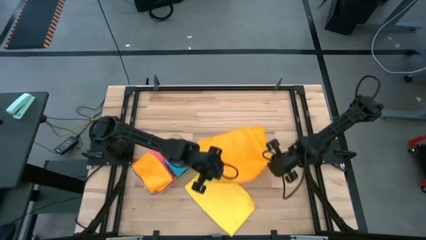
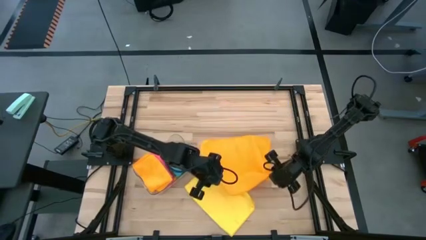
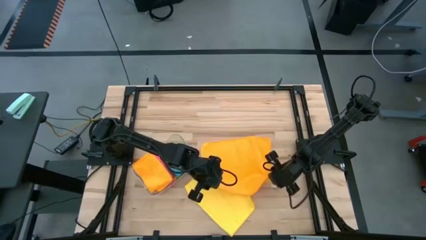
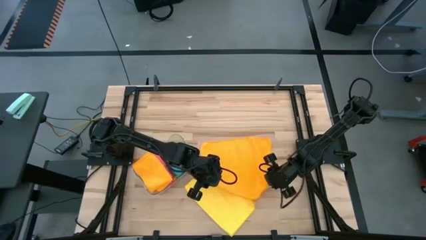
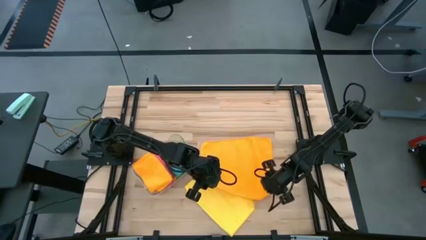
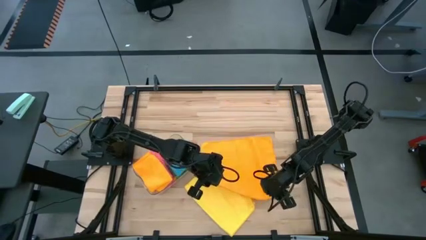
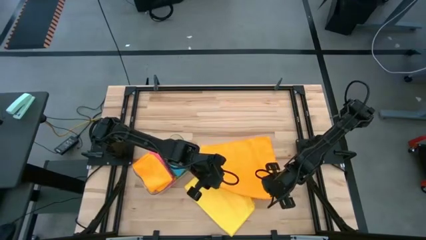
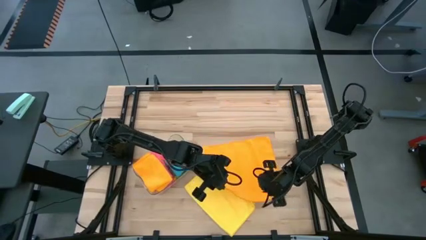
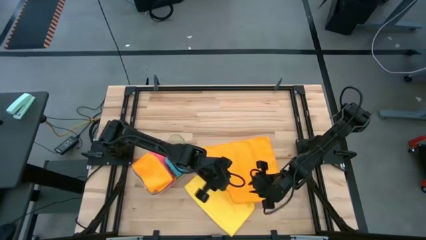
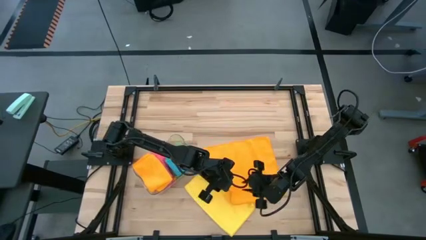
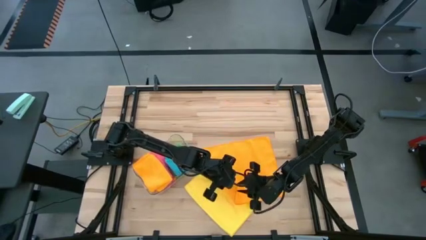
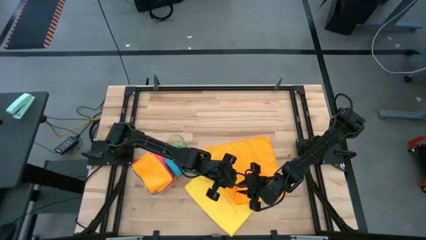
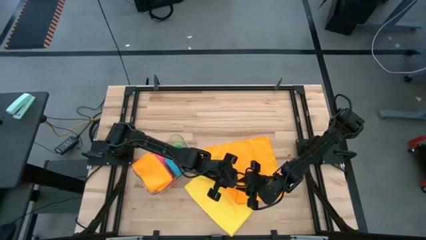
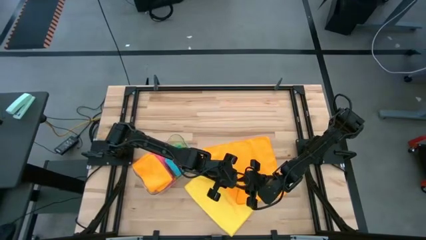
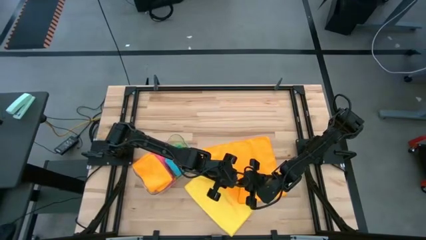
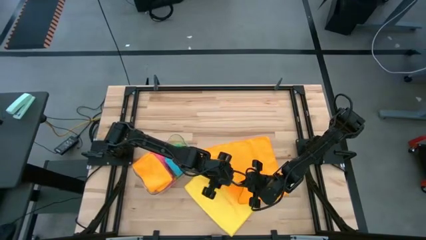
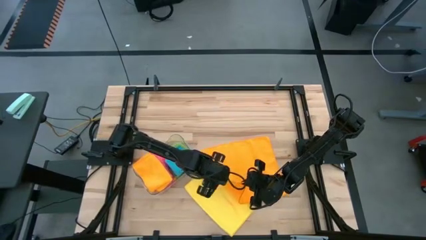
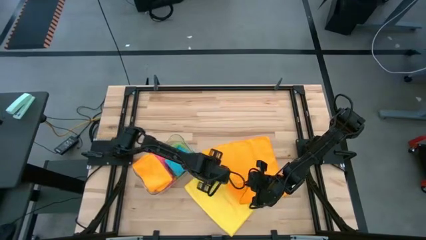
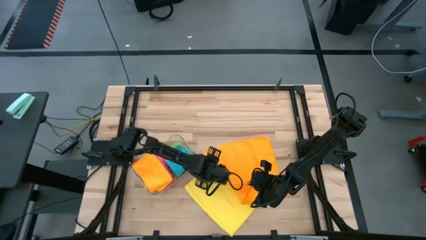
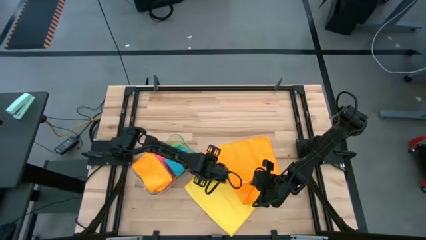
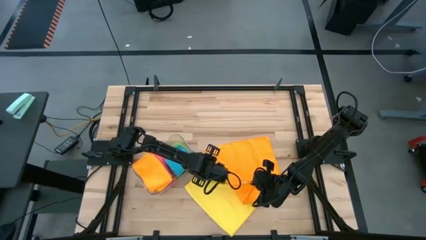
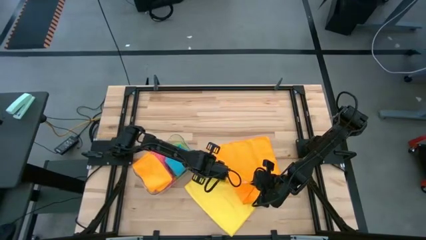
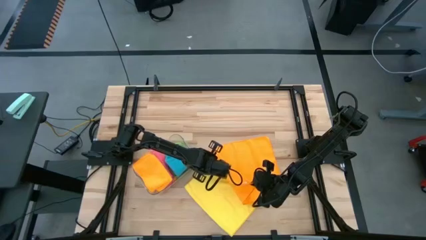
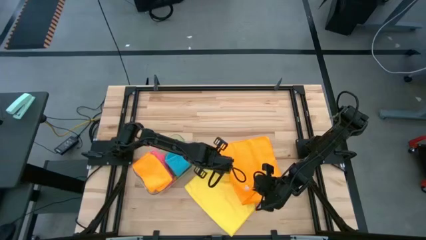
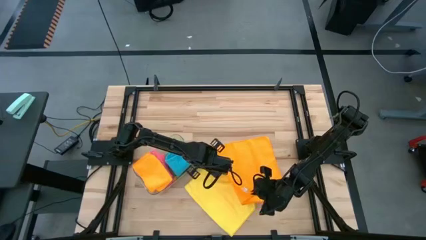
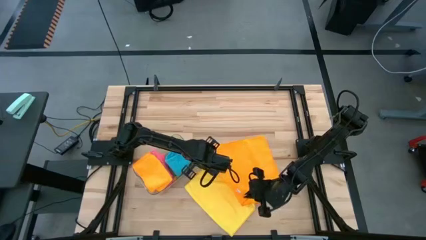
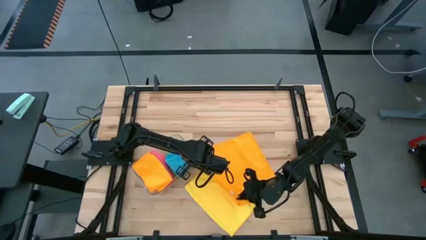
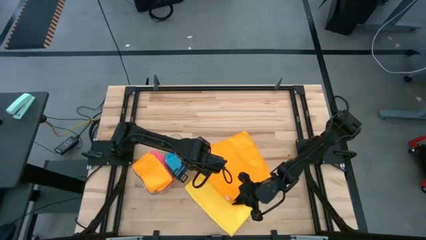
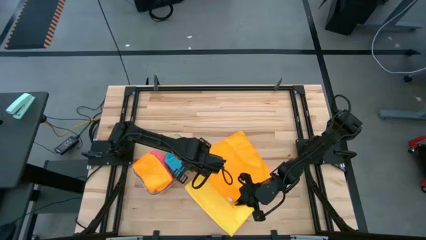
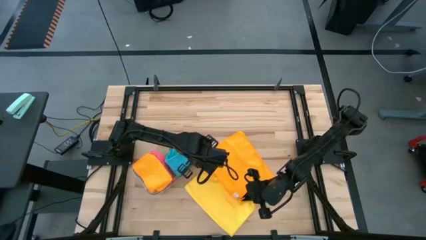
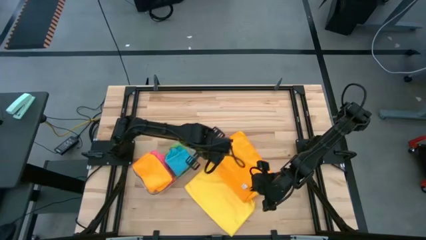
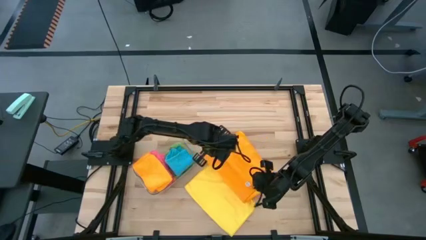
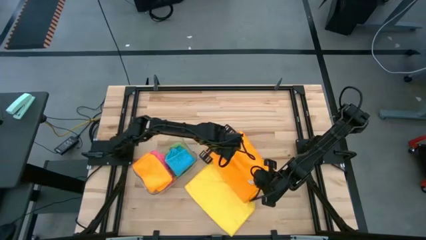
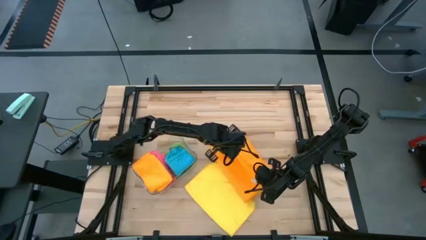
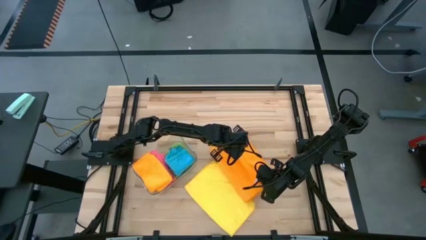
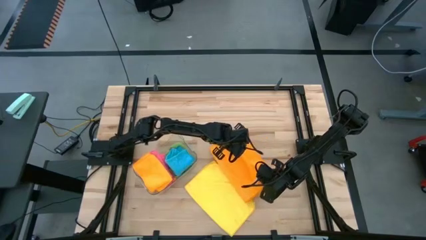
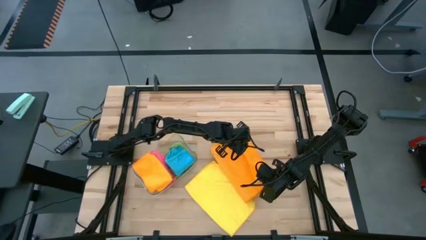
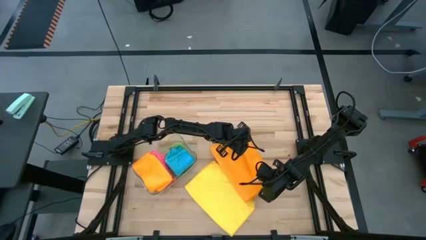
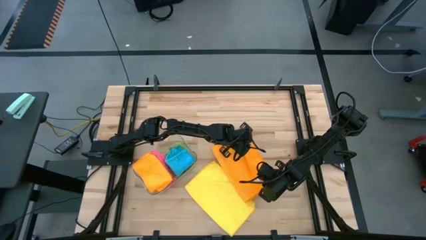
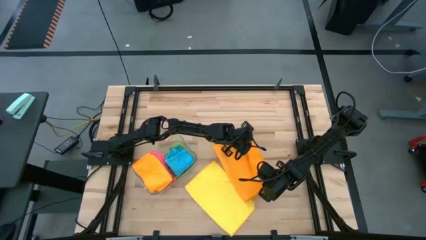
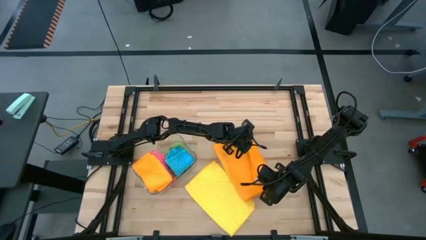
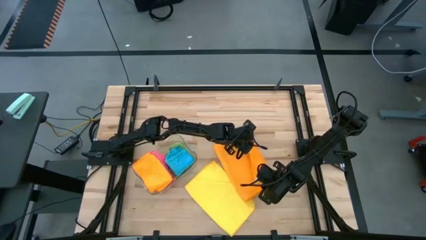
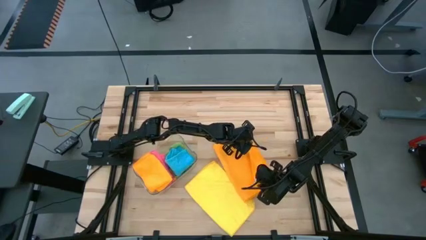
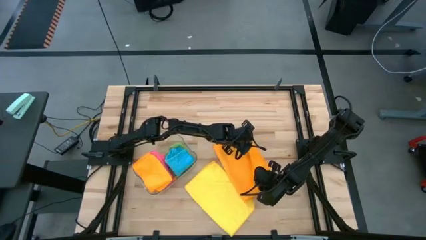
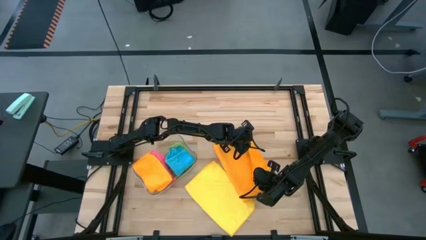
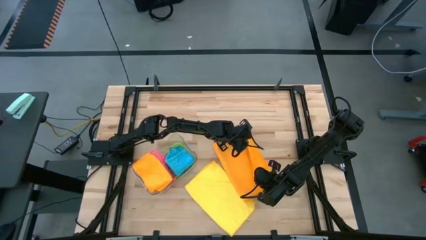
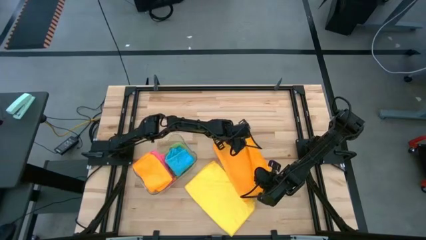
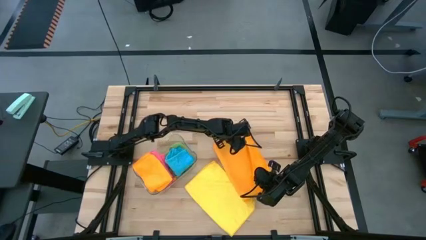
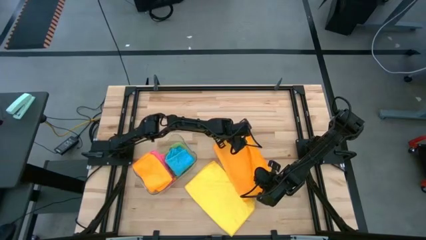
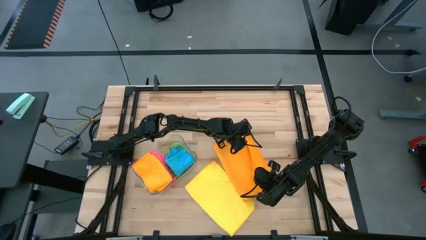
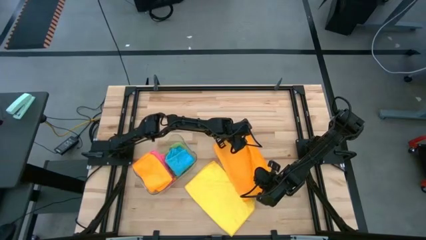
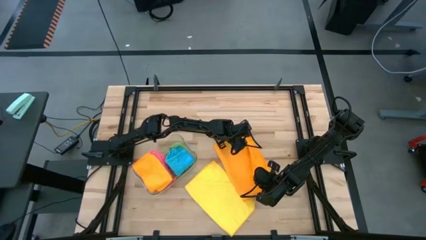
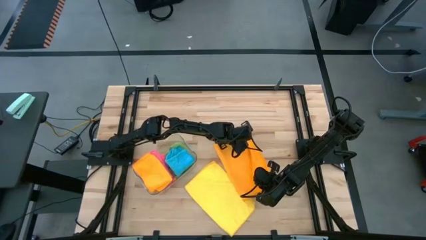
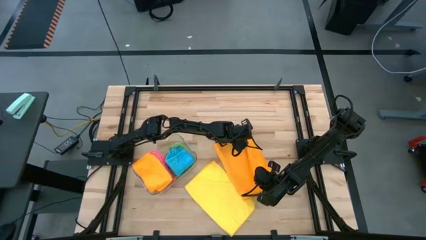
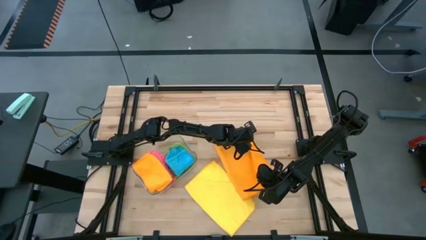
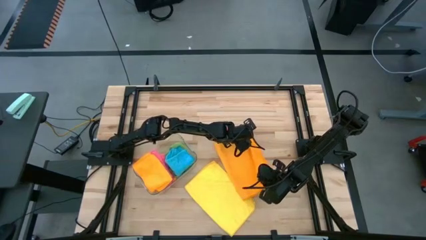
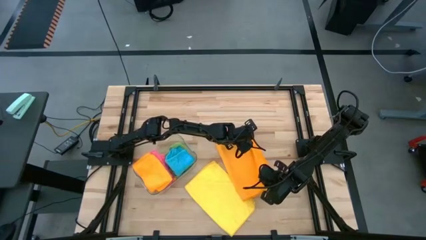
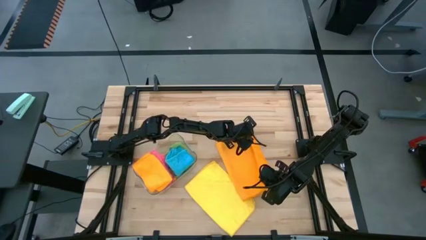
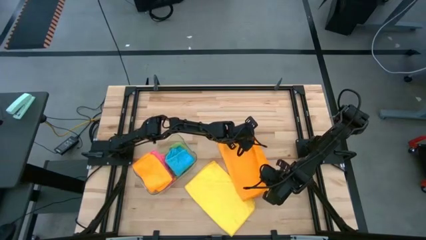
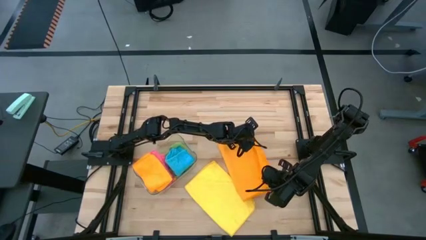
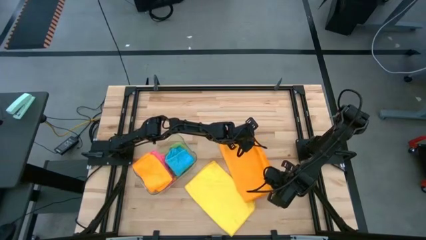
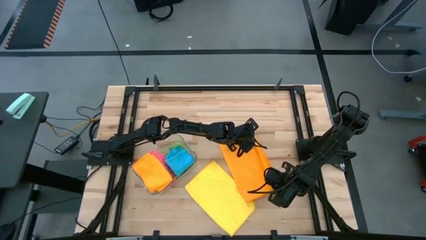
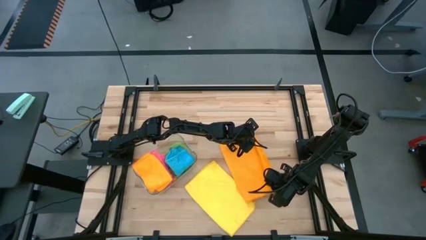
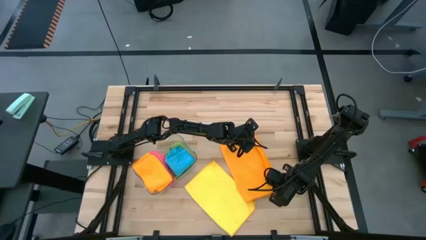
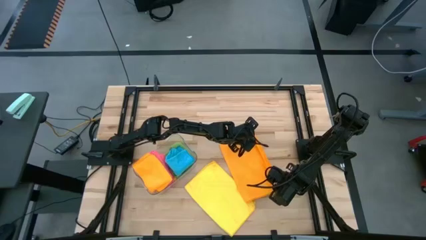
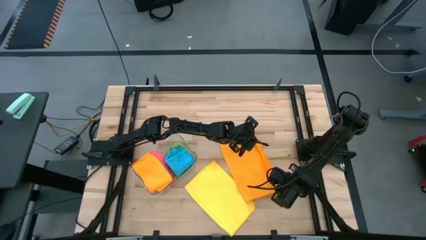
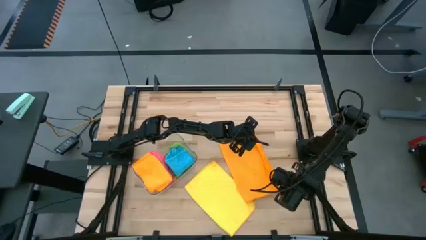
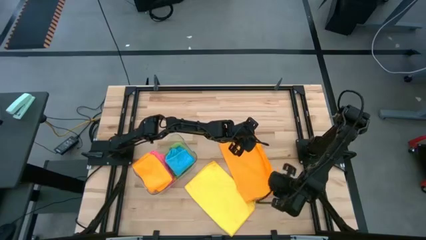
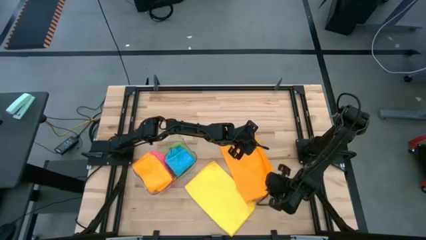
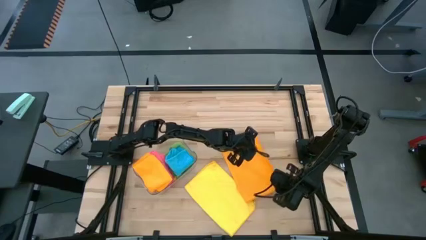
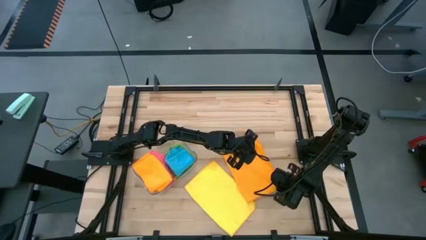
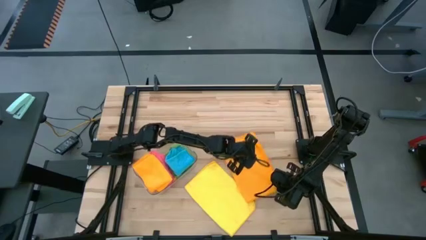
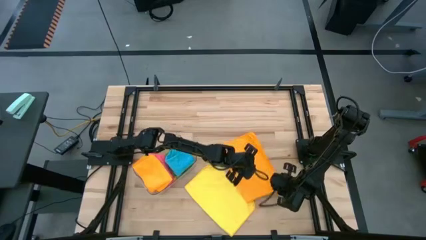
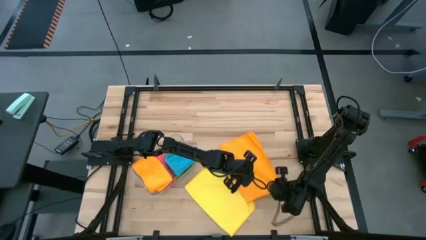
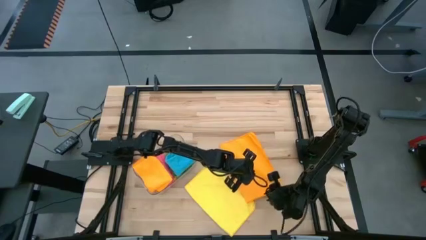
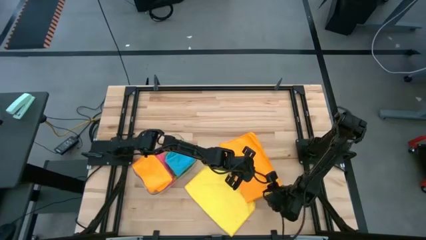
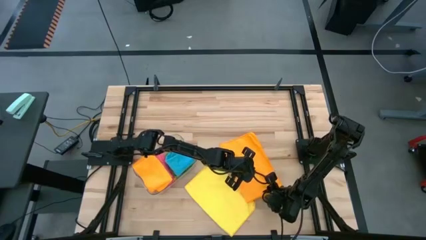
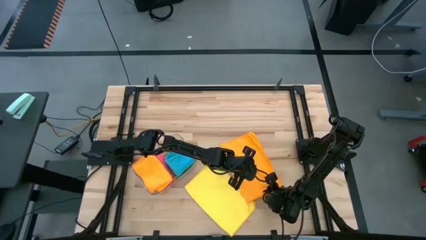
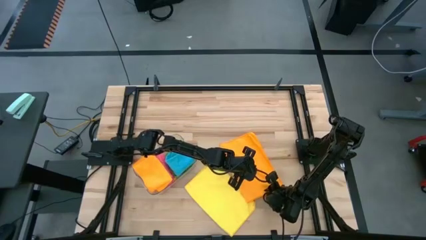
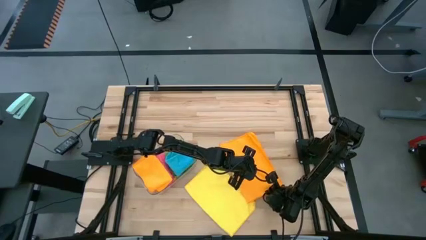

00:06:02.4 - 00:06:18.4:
Task: Fold microfiber towels
Fold the orange microfiber cloth
